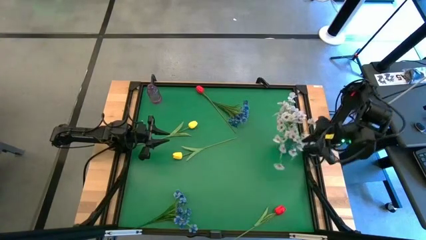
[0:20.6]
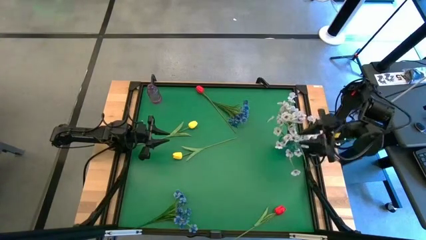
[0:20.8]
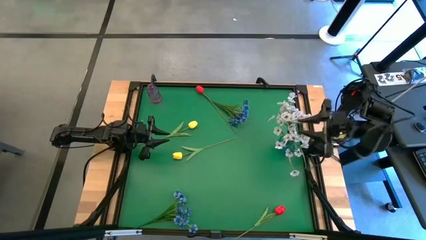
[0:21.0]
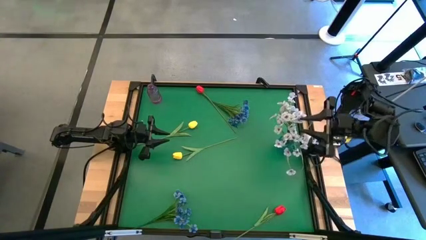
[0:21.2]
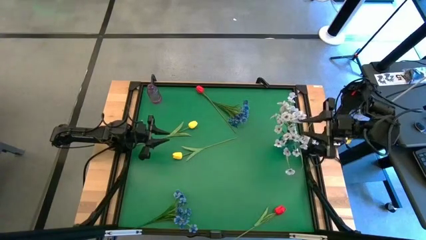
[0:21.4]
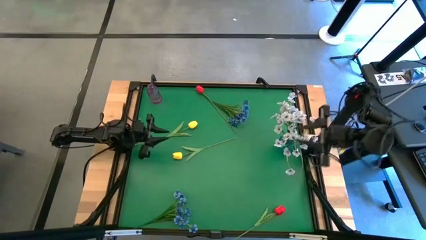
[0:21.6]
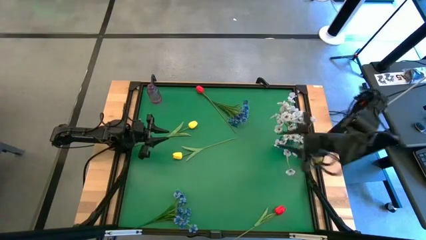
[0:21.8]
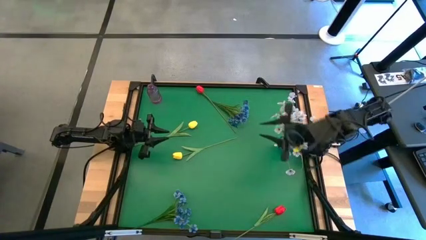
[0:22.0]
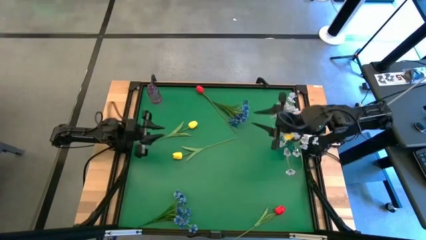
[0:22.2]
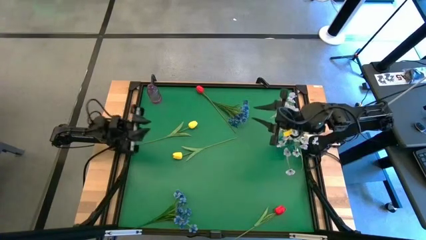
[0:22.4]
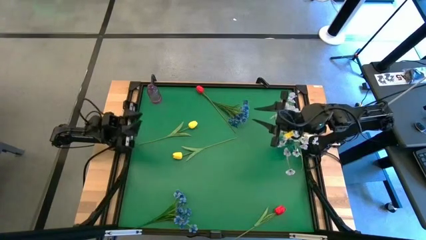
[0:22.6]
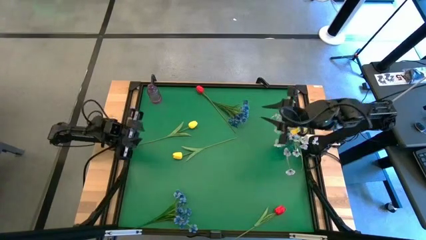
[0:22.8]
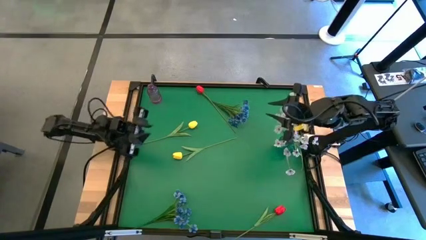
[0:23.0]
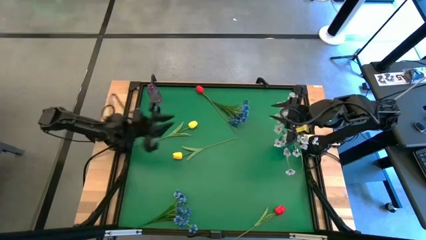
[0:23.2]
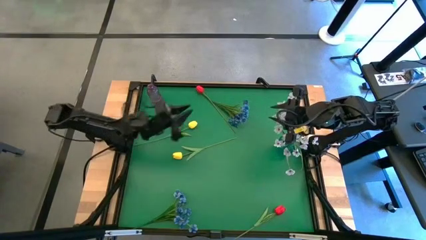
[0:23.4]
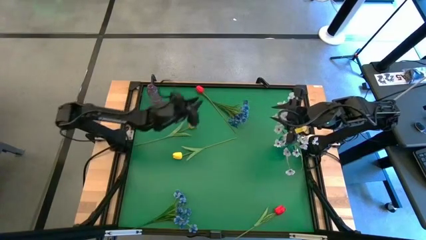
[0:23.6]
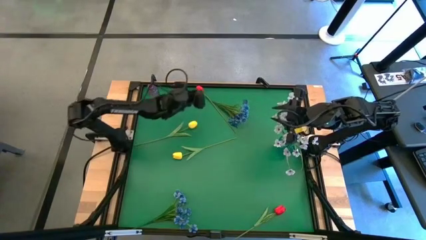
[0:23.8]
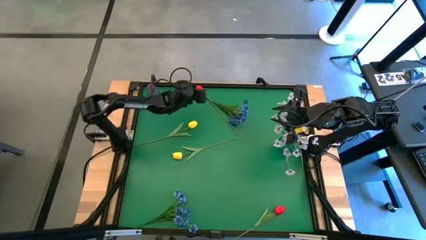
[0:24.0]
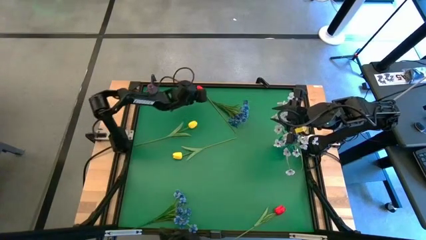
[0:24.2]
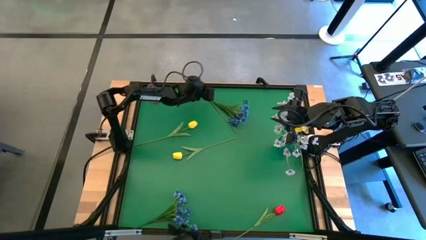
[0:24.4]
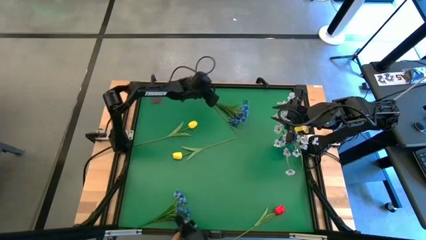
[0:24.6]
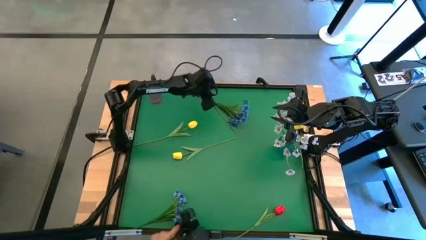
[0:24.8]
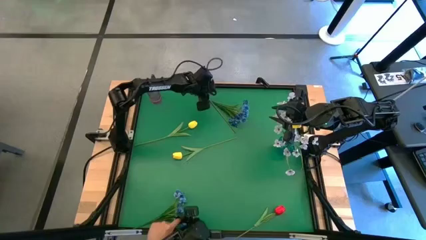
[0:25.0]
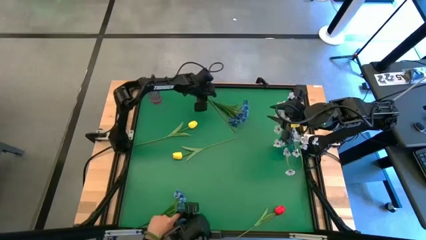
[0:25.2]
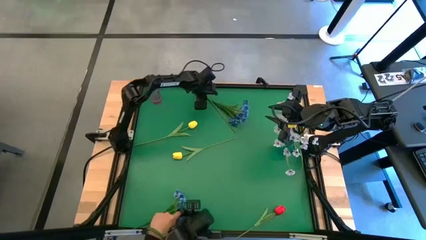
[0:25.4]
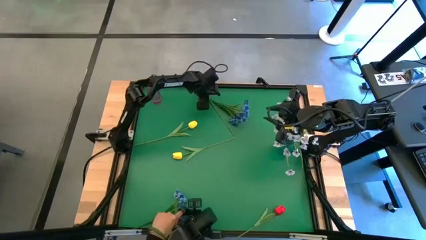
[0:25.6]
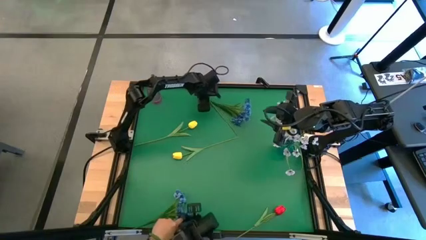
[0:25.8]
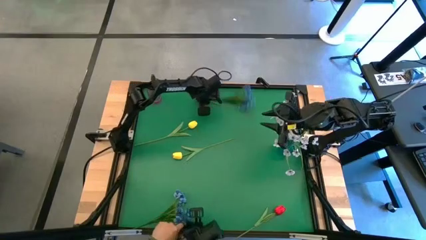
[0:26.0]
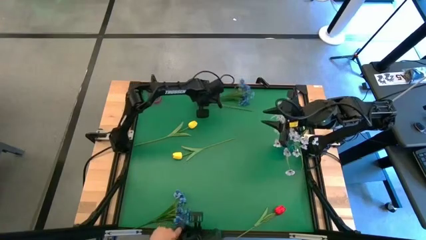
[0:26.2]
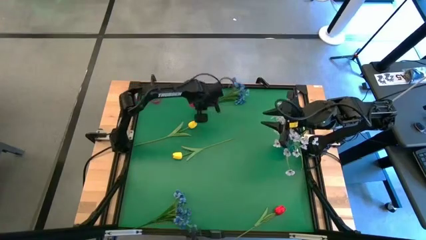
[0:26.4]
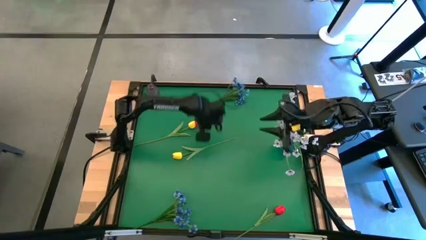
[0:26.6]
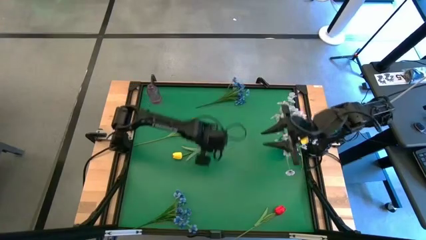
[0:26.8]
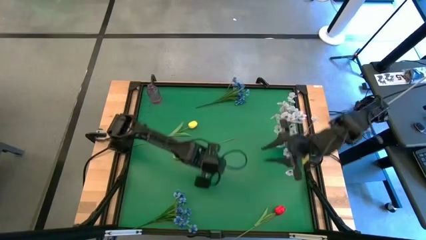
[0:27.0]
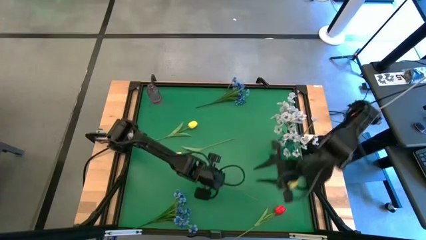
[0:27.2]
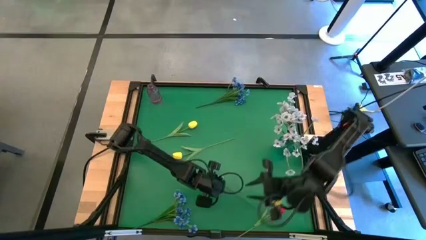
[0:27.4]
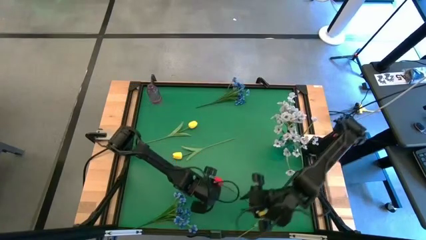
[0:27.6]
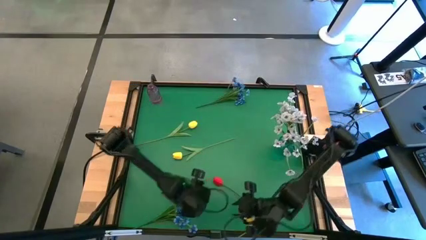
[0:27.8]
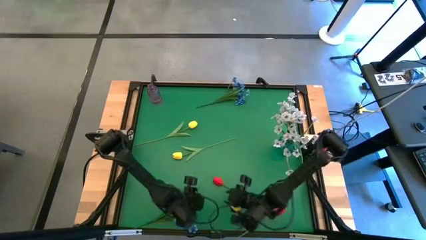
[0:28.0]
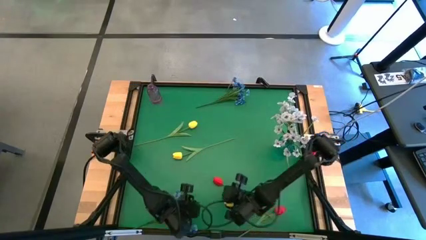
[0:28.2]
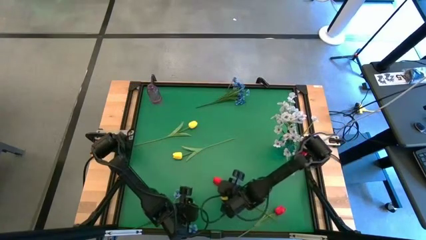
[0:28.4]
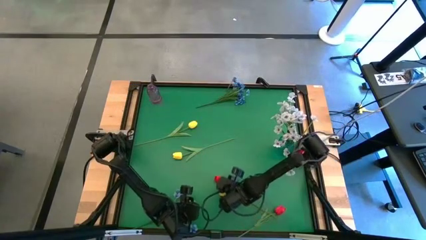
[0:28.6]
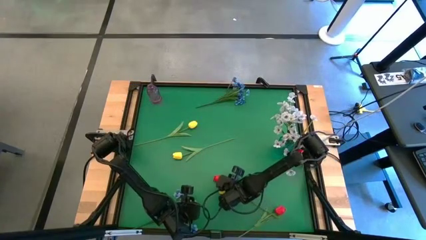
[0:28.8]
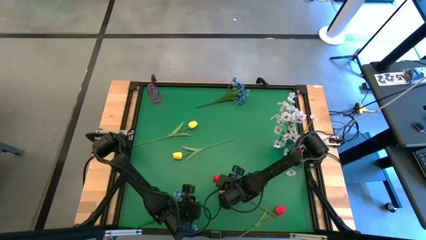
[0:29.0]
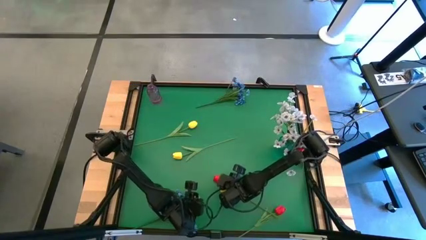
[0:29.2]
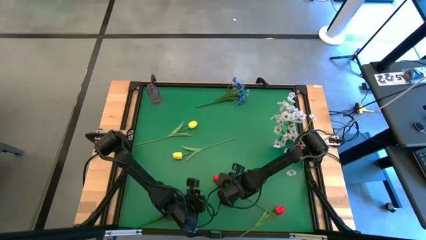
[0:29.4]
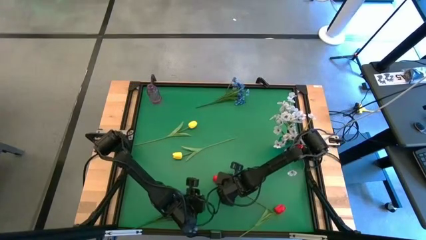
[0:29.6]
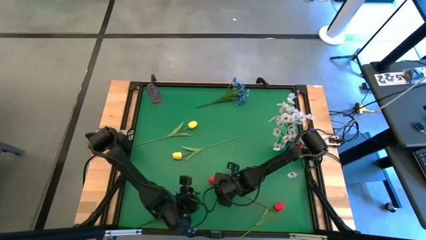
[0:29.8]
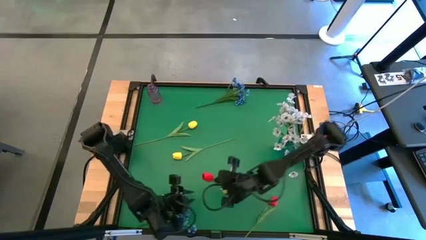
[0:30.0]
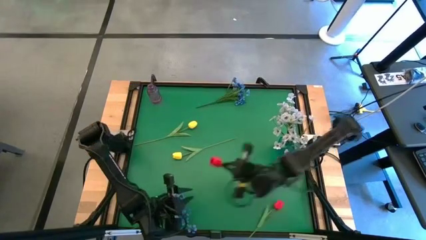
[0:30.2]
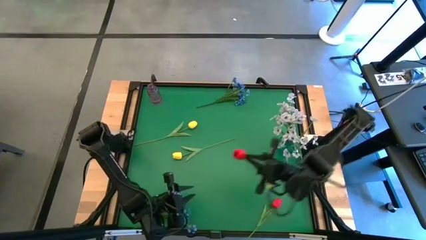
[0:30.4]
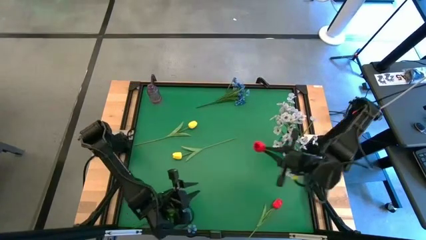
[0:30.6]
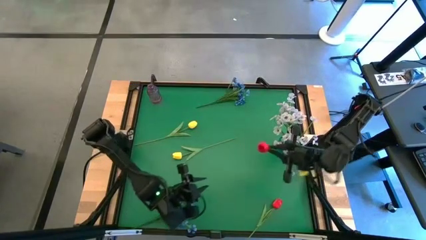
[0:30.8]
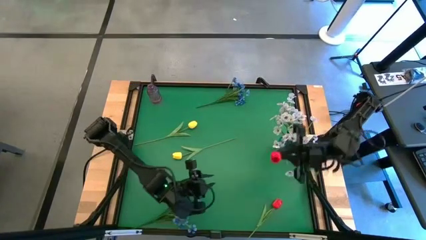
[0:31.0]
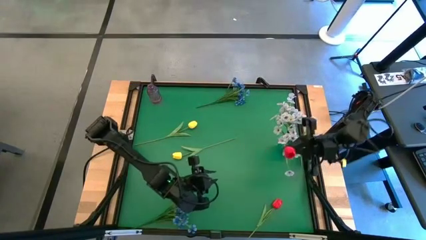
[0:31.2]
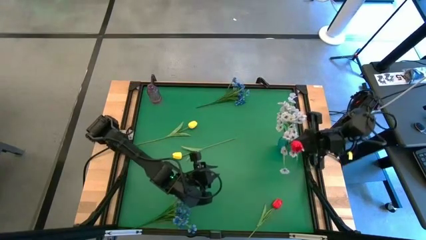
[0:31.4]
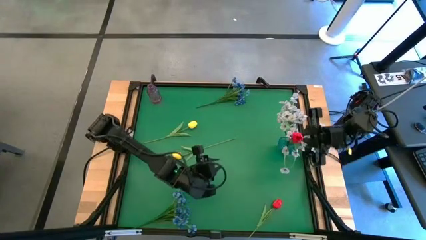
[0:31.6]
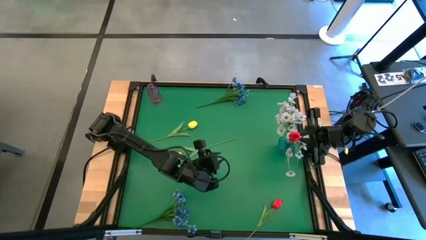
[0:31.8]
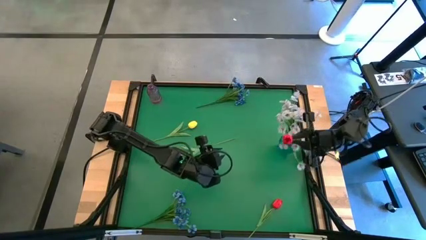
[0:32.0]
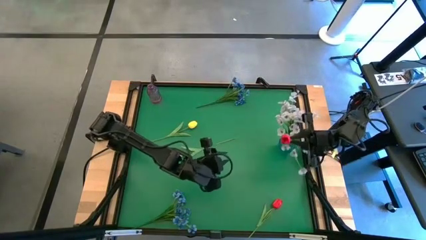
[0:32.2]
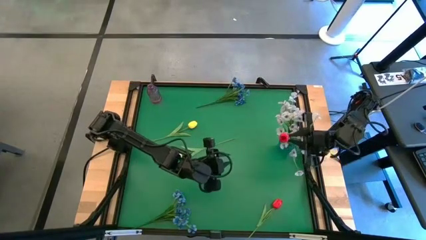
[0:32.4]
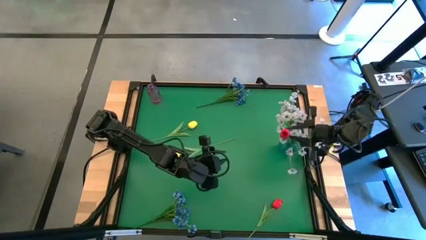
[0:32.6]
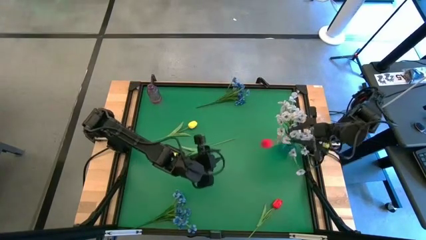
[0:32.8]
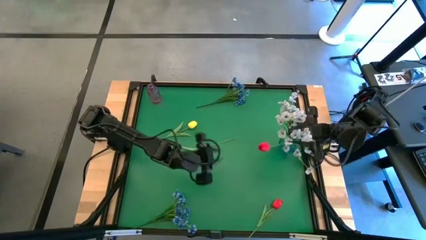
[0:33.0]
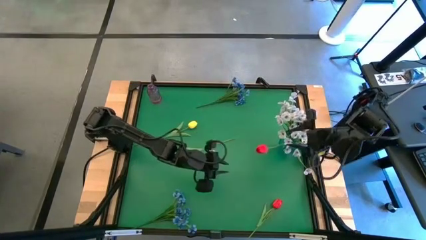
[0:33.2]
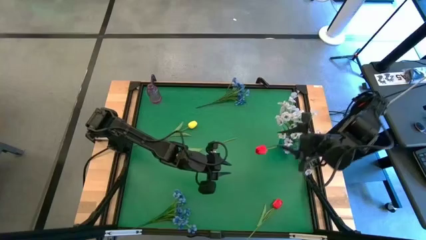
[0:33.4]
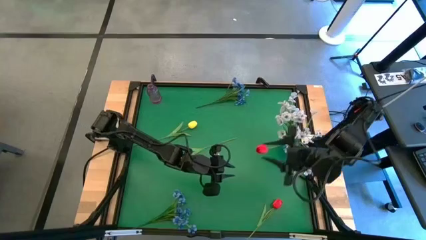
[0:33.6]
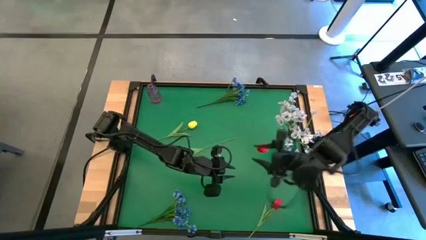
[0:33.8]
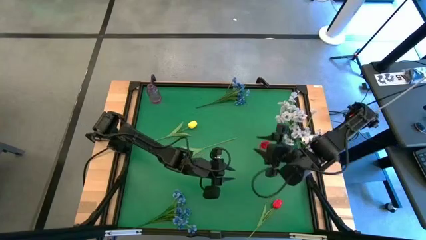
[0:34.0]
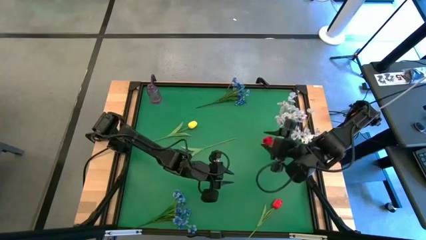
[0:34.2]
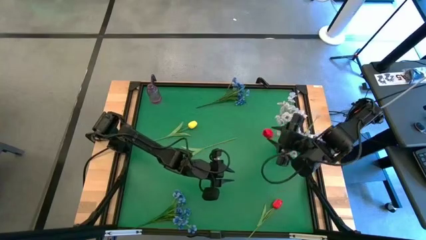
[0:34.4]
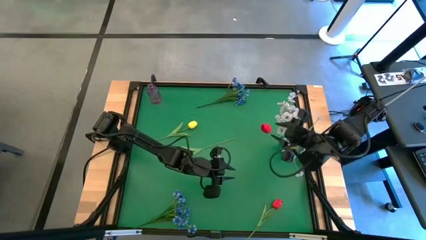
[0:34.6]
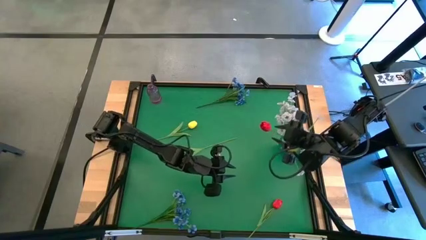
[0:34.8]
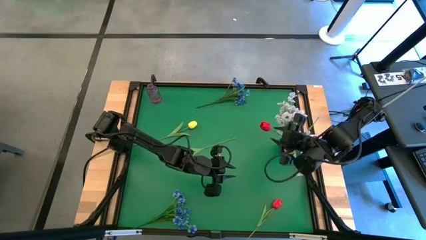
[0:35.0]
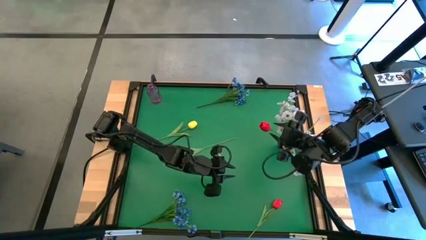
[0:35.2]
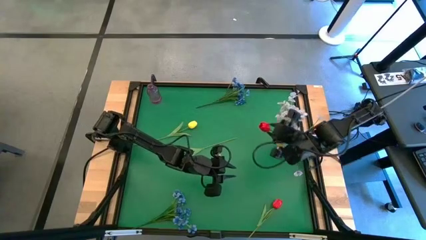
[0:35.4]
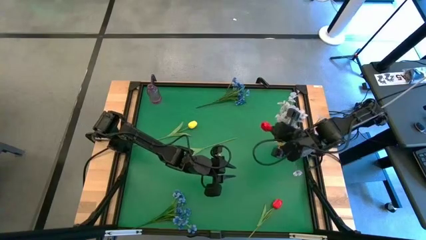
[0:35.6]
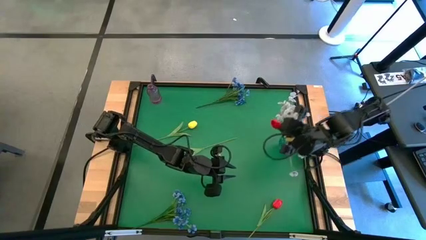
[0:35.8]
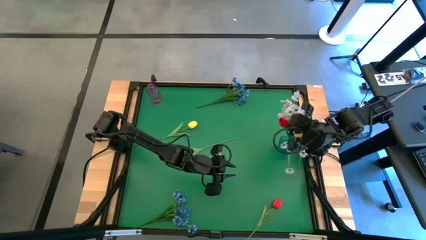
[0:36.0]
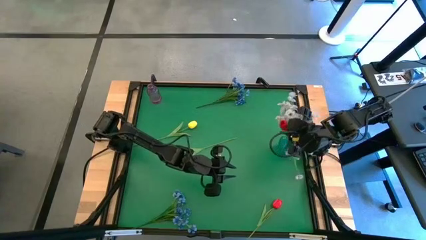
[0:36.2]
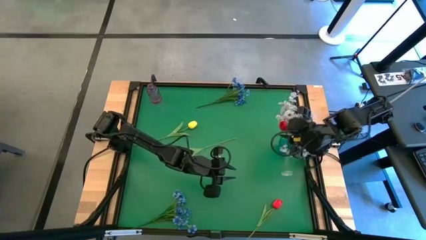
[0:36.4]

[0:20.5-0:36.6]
Task: Sort flowers into vase by color
Put the top red flower into the blue vase
